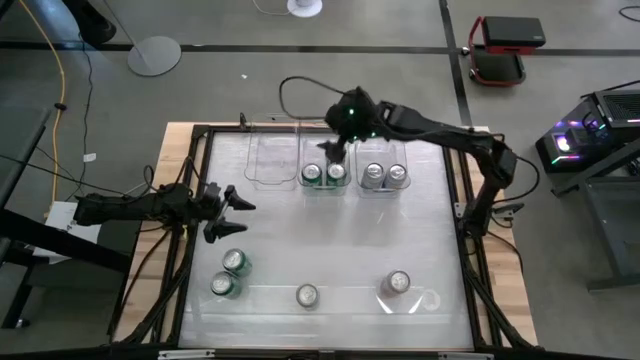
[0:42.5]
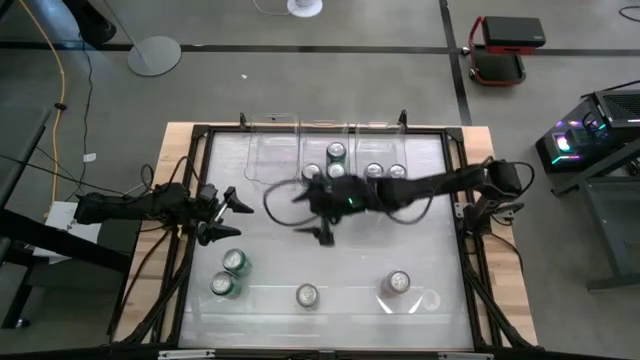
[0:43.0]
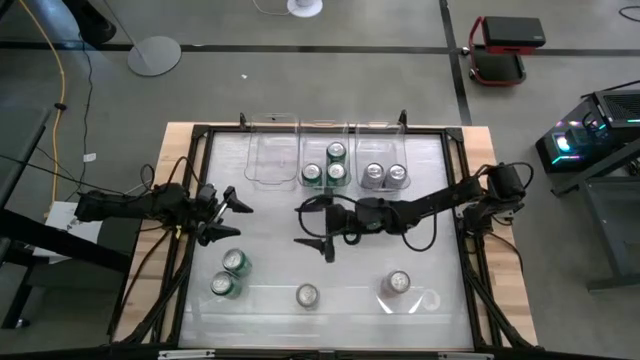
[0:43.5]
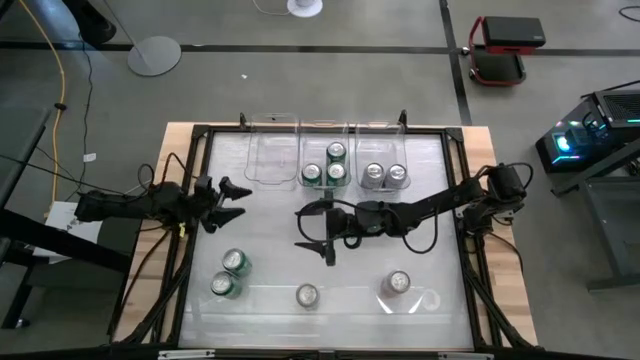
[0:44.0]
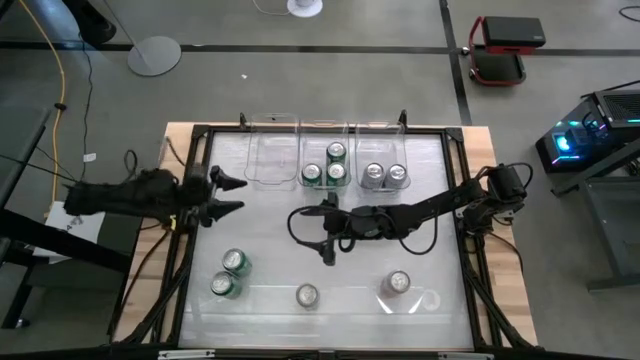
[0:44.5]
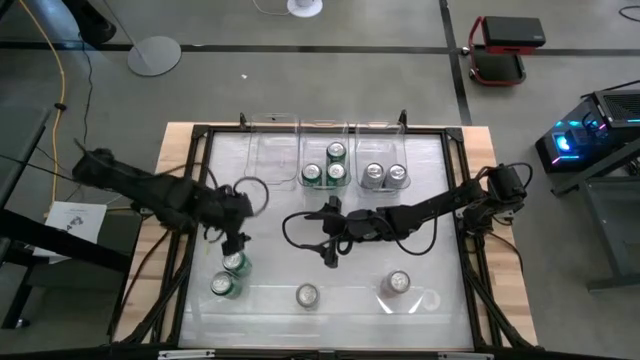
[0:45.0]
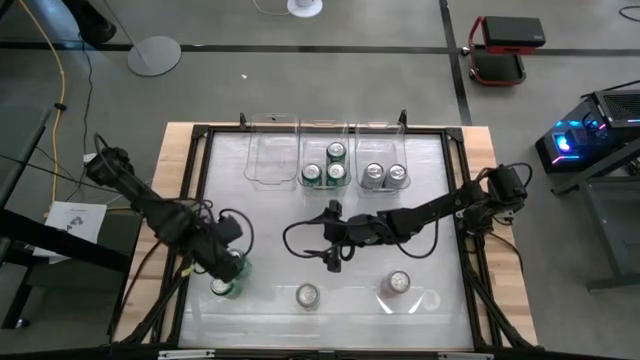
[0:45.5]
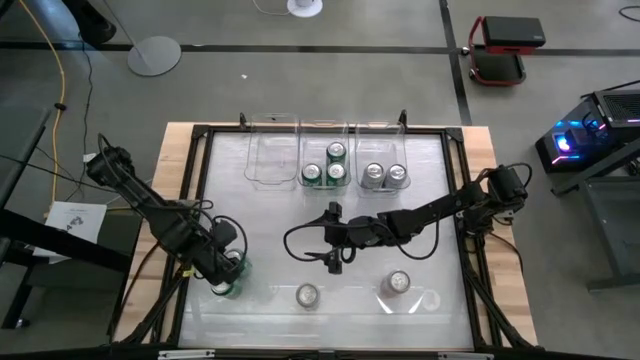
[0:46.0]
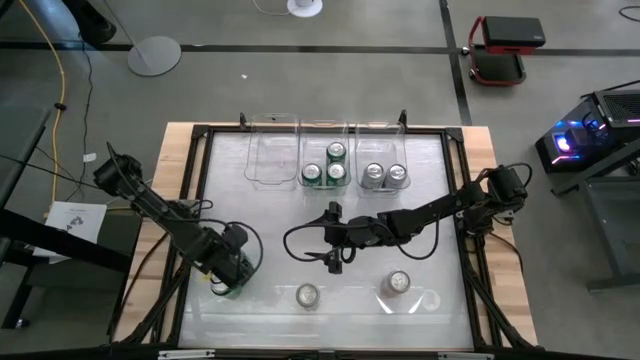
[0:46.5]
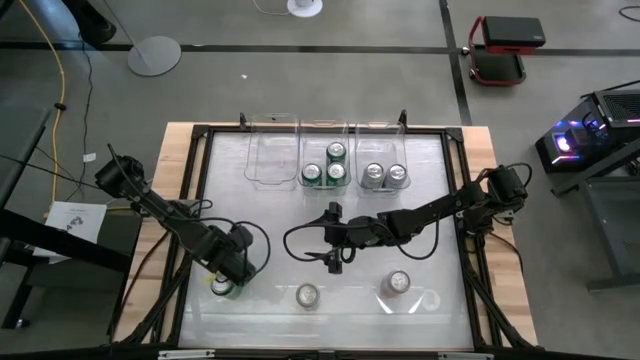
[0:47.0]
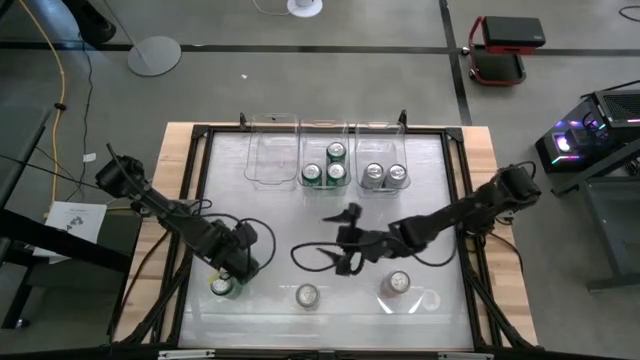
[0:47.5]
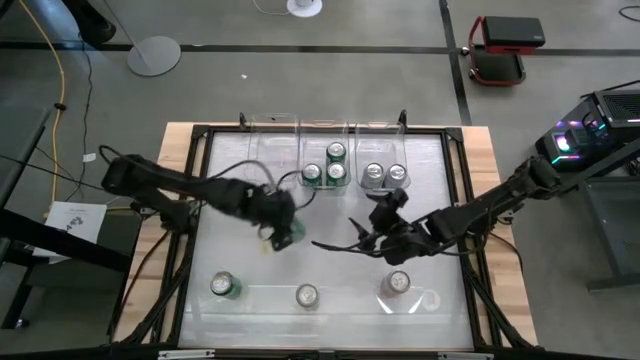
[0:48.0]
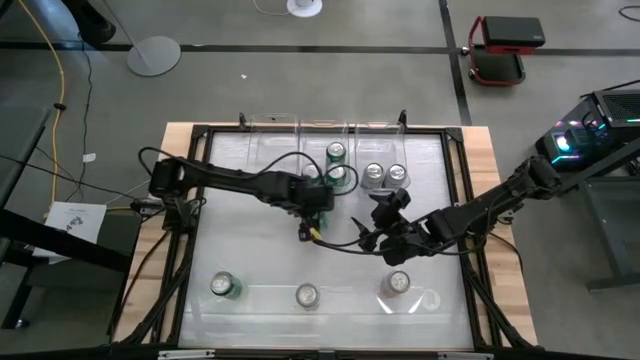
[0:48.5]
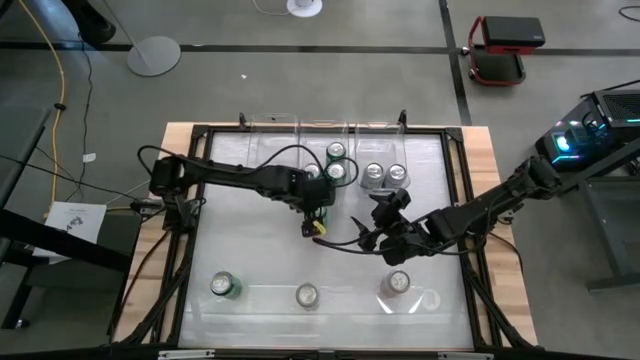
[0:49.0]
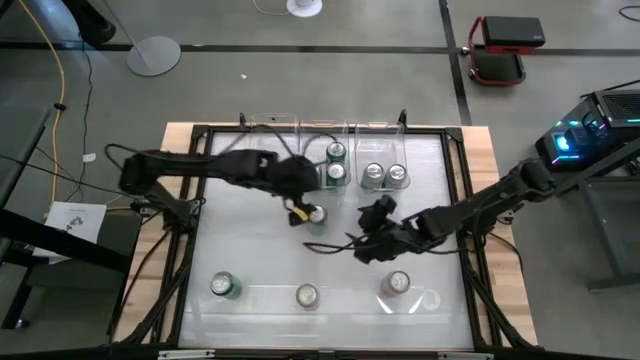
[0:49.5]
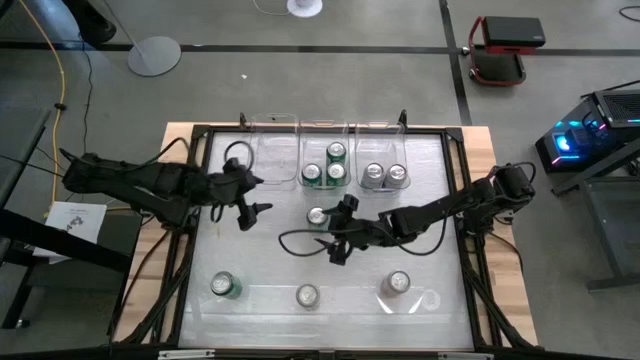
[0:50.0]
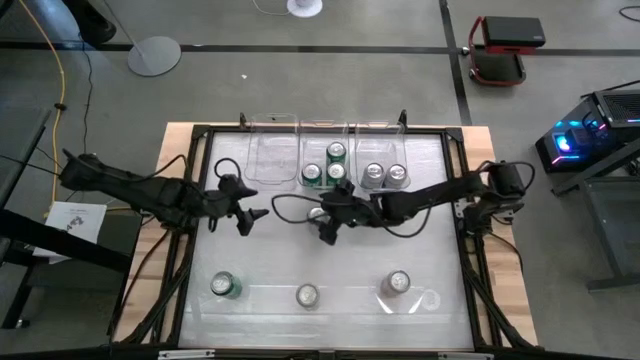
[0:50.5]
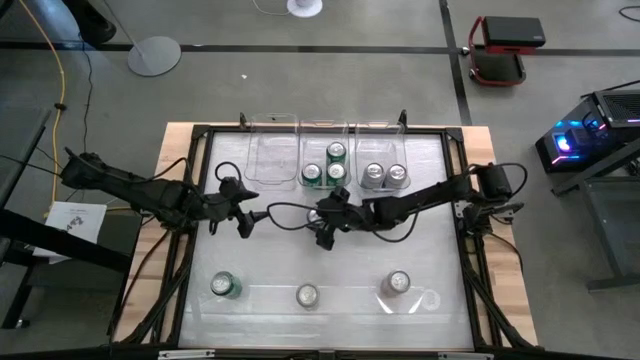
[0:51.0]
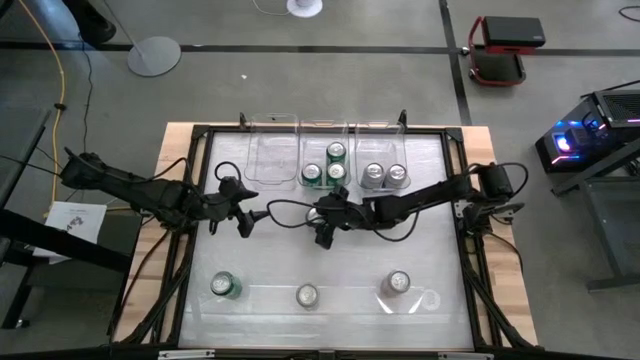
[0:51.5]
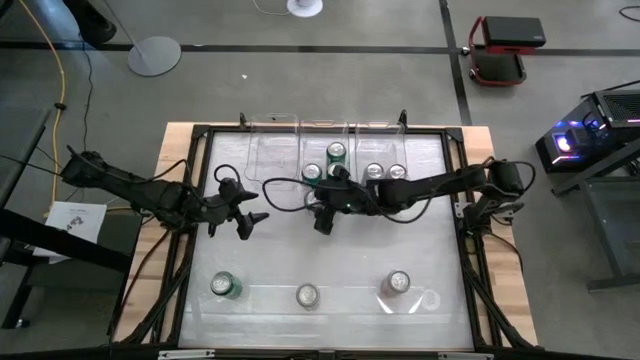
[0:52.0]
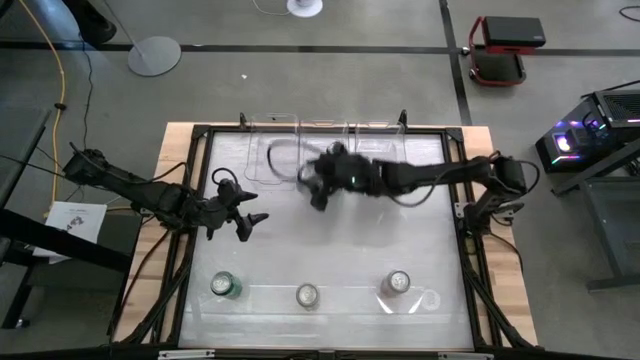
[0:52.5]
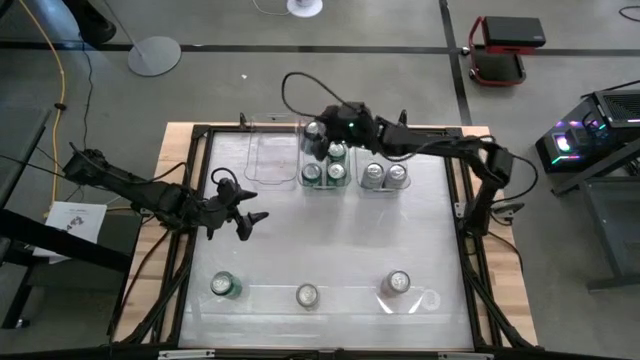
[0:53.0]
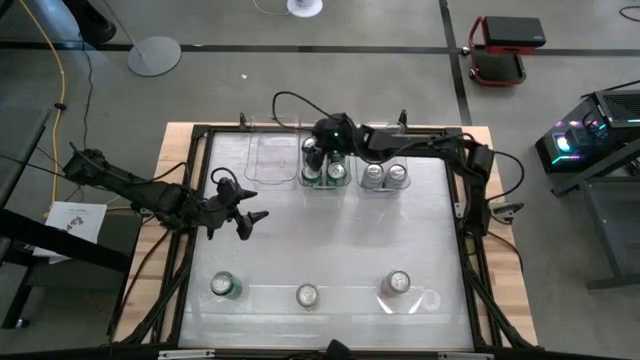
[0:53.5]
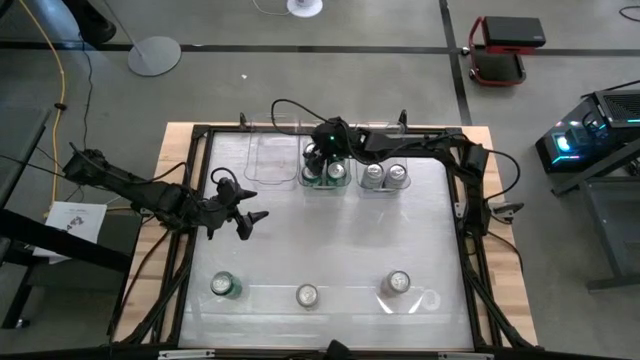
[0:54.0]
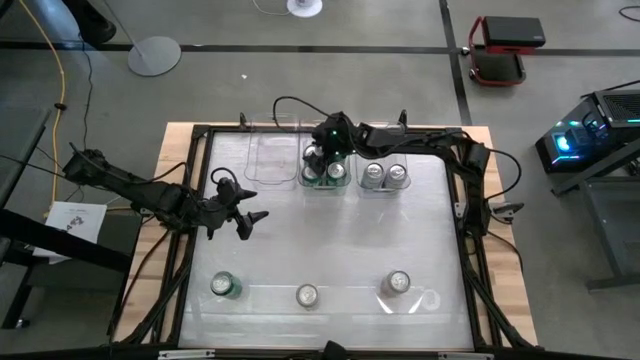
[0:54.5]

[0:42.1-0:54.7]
Task: Sort soda cans
Put the green soda can into the middle transparent bin

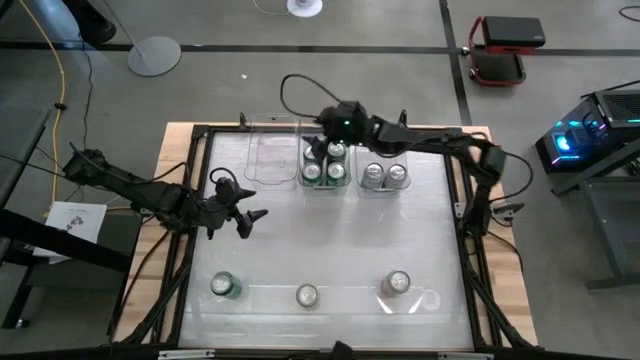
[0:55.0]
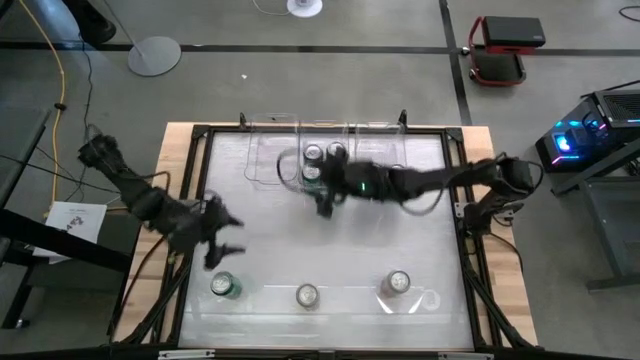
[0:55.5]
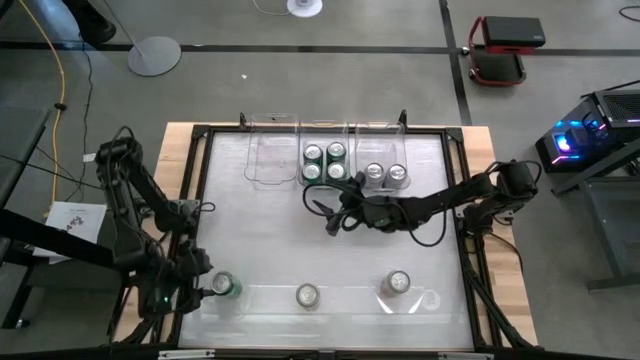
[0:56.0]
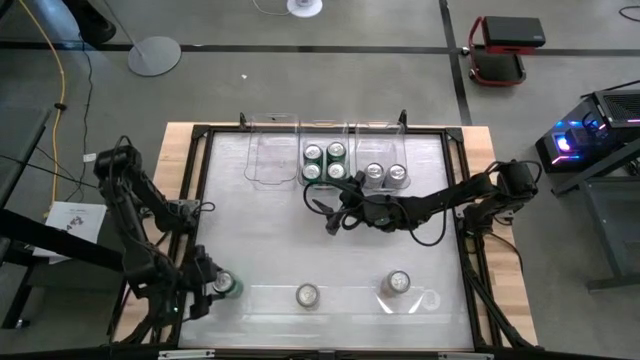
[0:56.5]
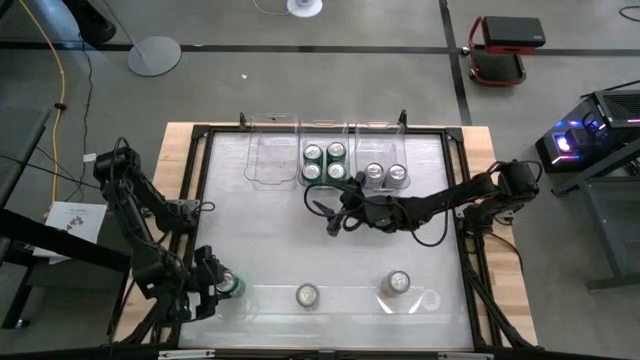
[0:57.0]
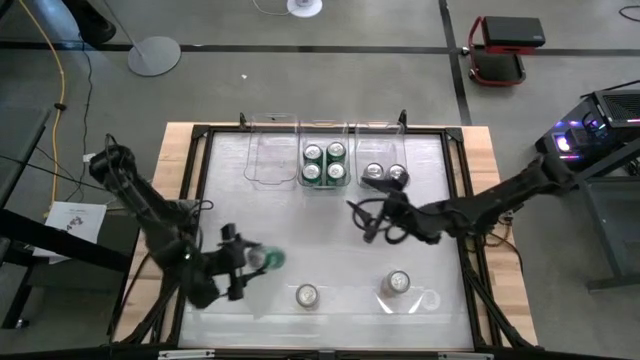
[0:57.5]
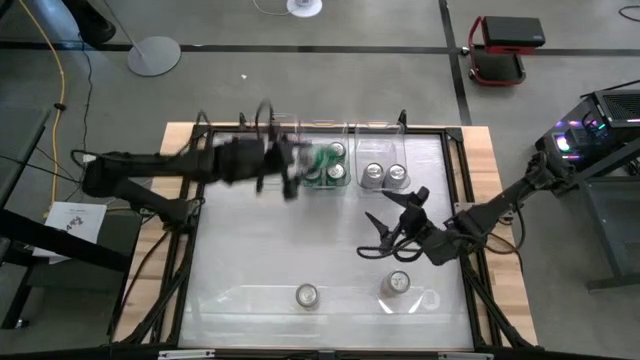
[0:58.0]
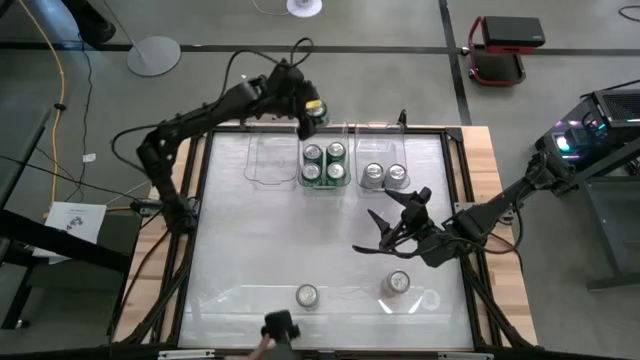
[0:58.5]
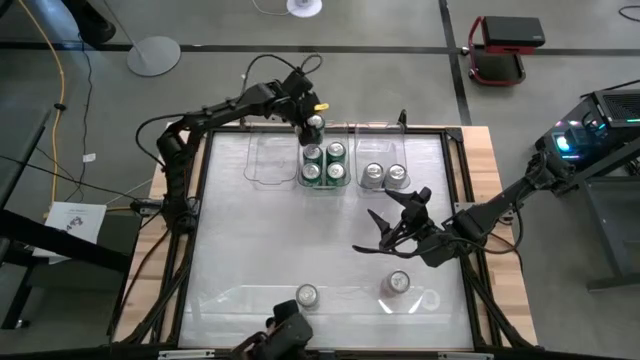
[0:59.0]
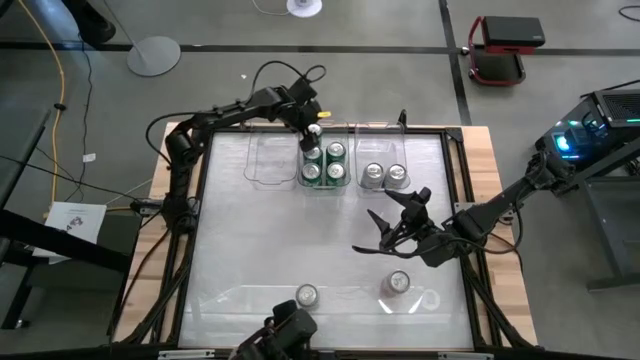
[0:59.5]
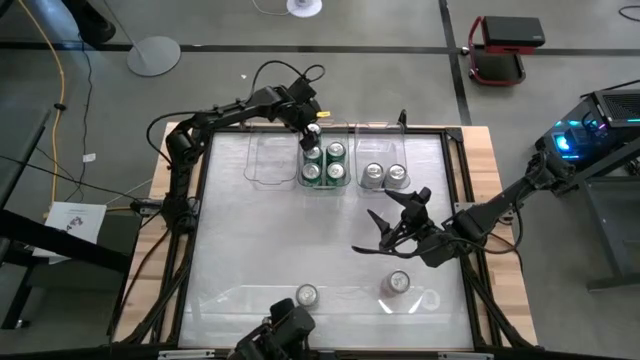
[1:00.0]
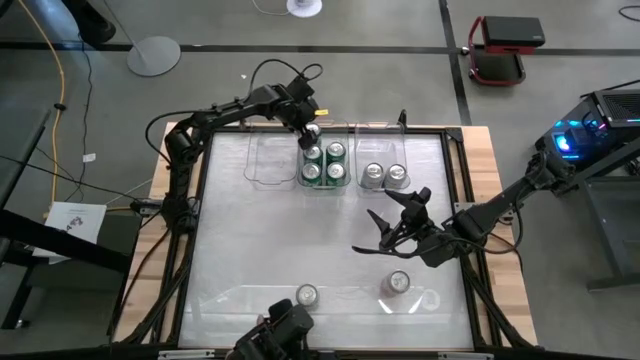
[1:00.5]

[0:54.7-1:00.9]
Put the green soda can into the middle transparent bin

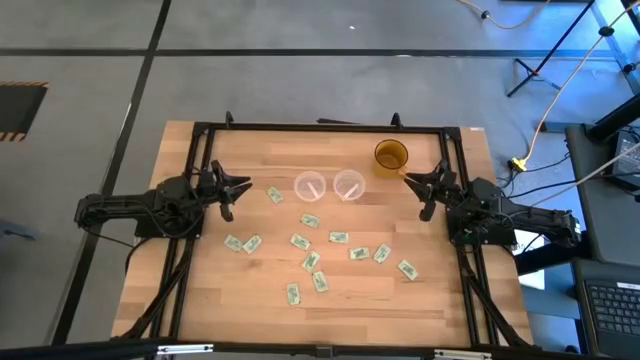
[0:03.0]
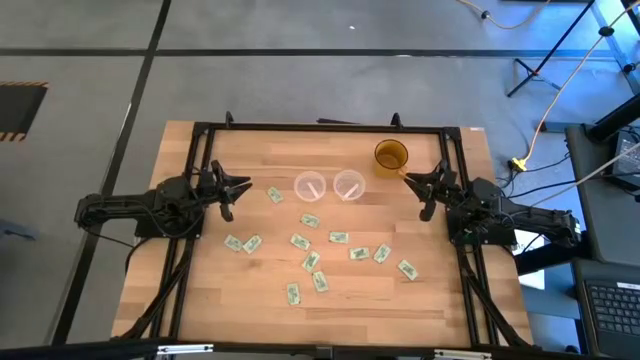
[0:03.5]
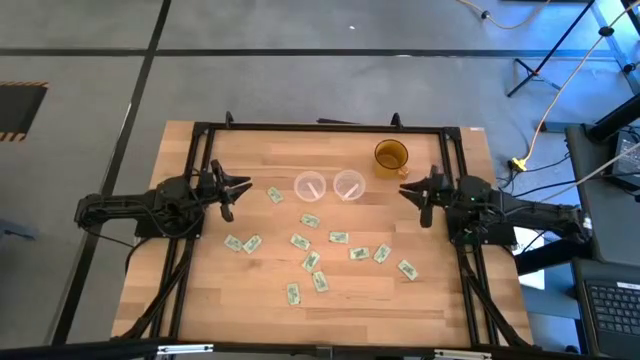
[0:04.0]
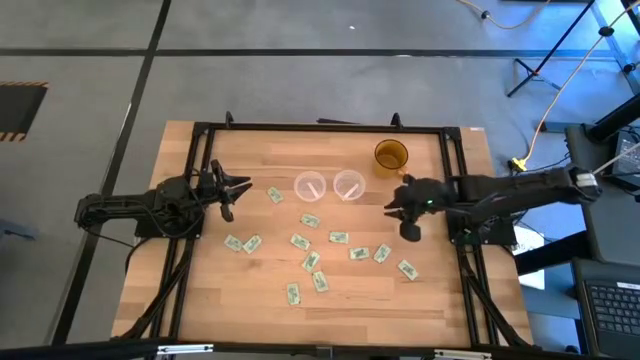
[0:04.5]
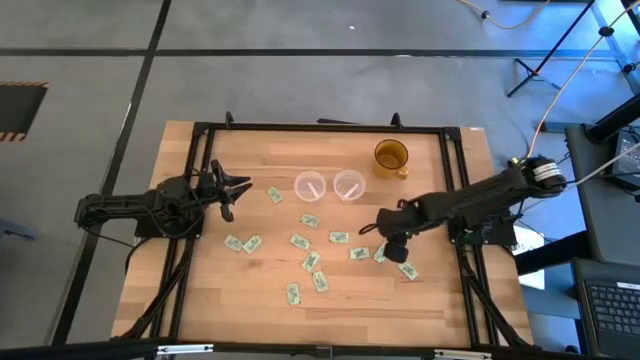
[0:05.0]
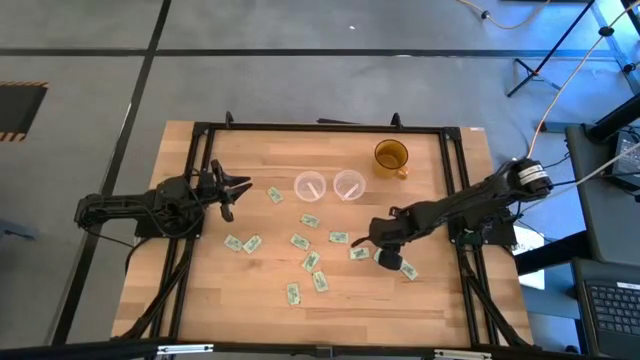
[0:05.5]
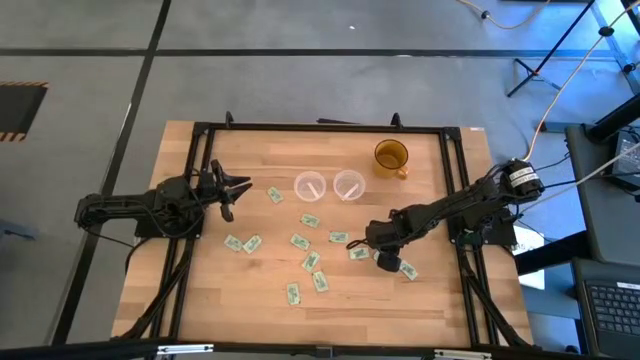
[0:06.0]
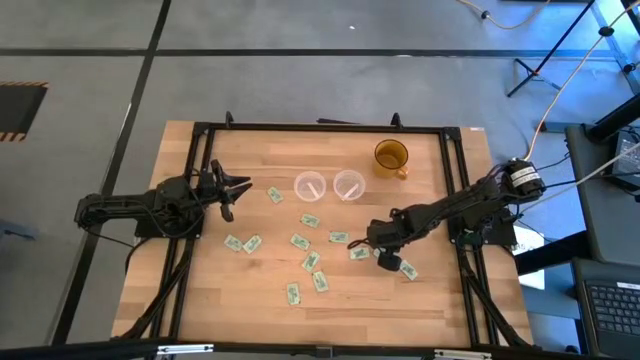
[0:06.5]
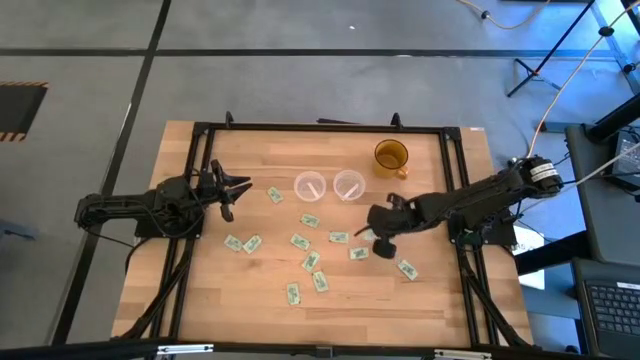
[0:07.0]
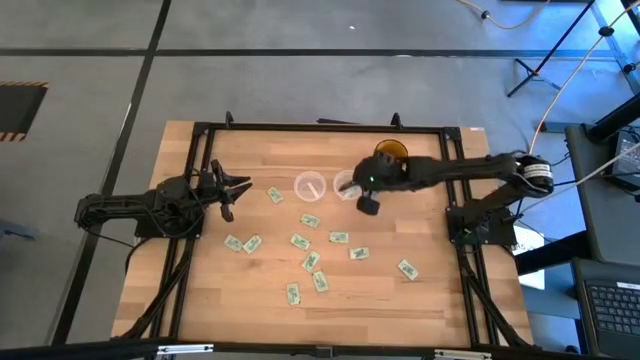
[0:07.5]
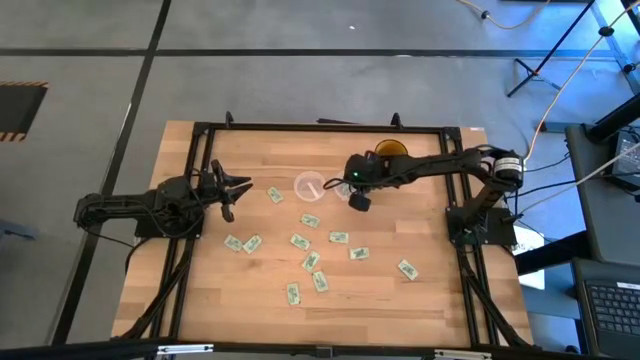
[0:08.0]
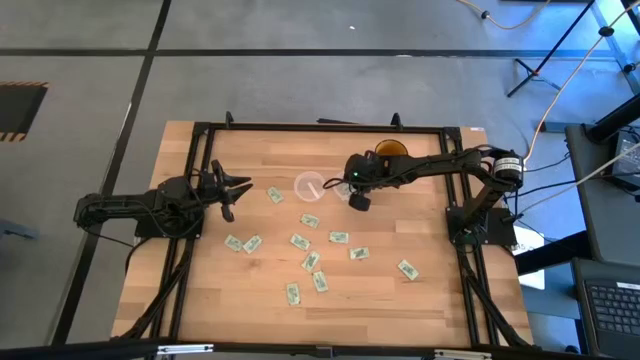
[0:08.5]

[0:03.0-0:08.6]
Task: Pick and place Stevia / Truvia into bins
Put the stevia packet into the right transparent container
